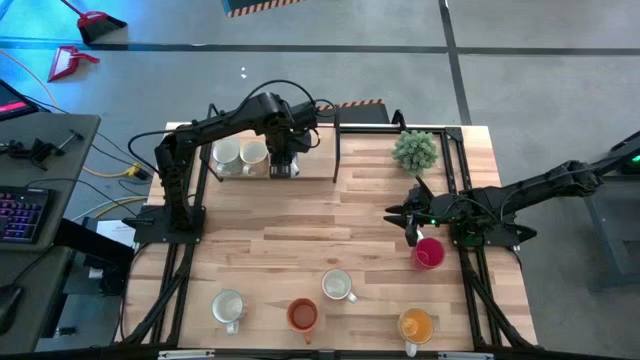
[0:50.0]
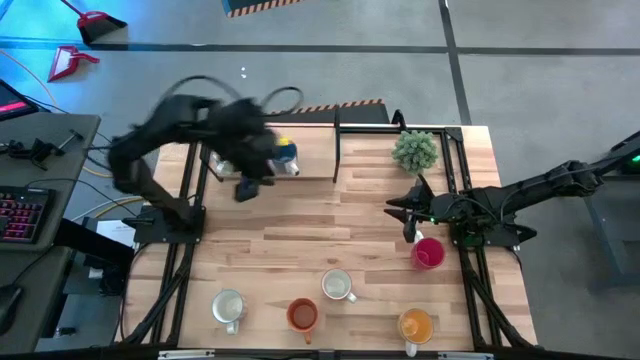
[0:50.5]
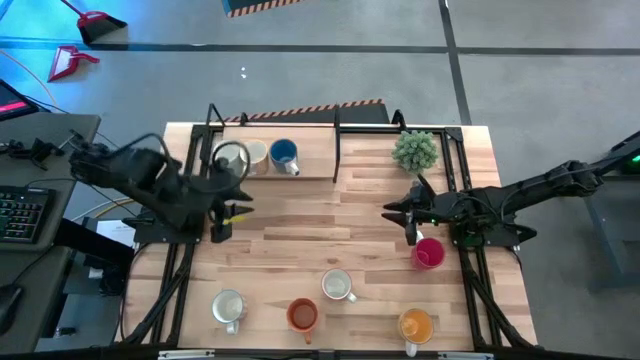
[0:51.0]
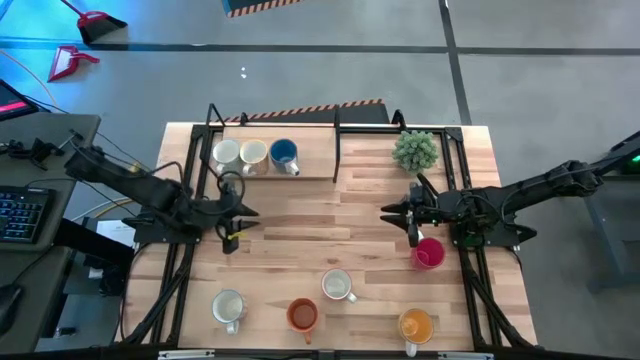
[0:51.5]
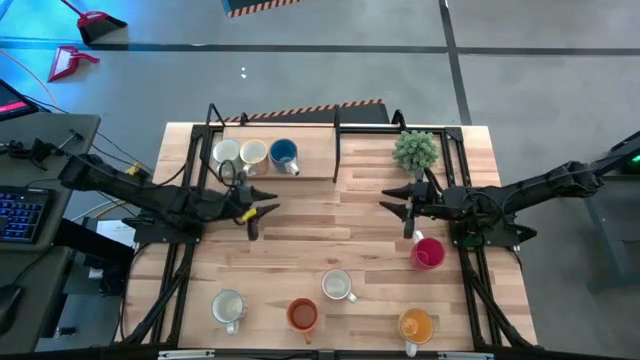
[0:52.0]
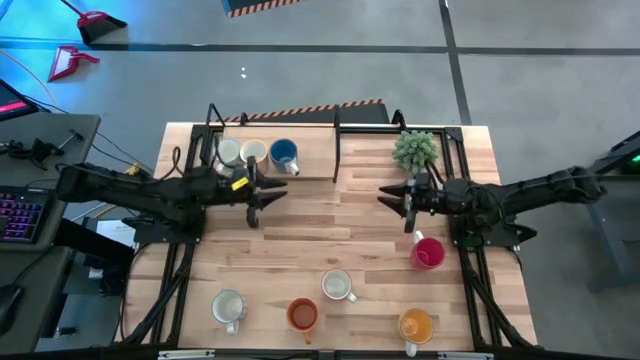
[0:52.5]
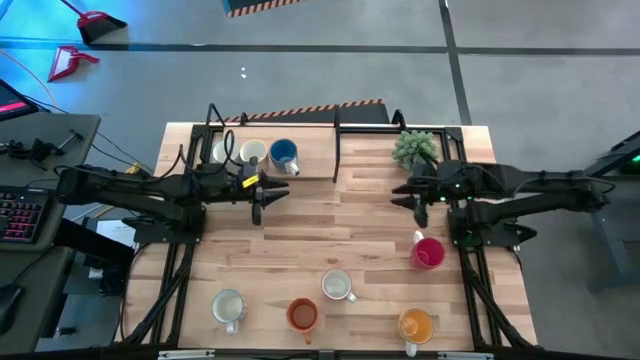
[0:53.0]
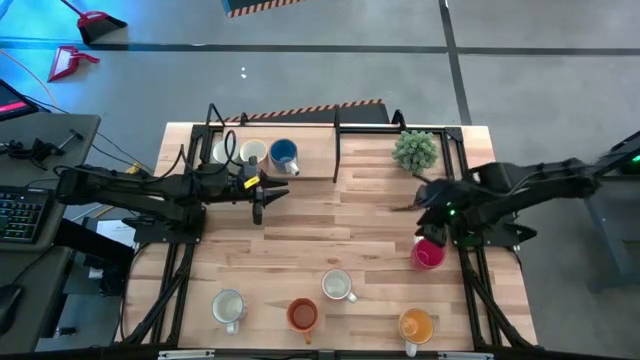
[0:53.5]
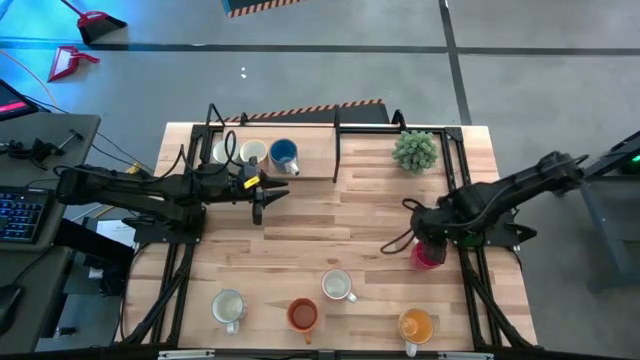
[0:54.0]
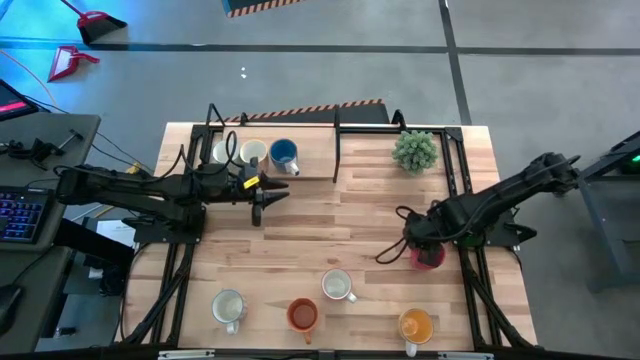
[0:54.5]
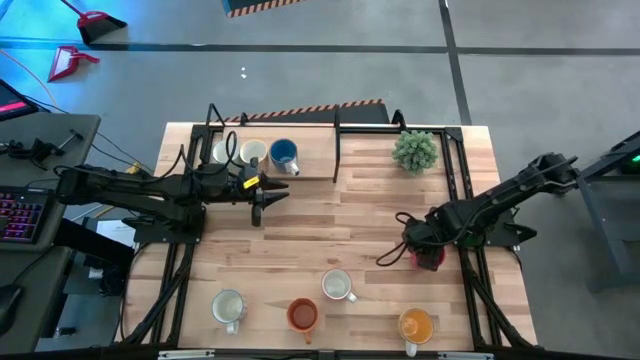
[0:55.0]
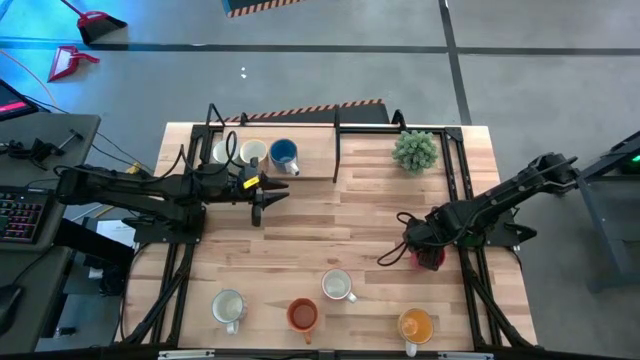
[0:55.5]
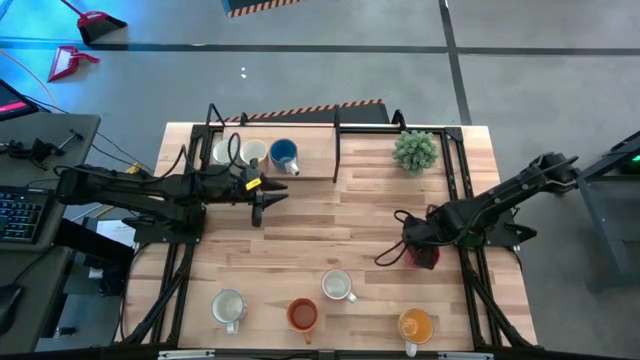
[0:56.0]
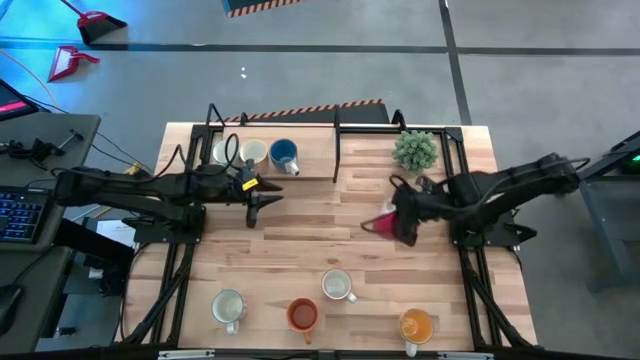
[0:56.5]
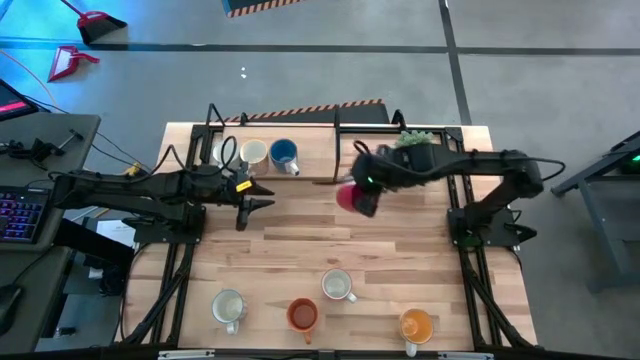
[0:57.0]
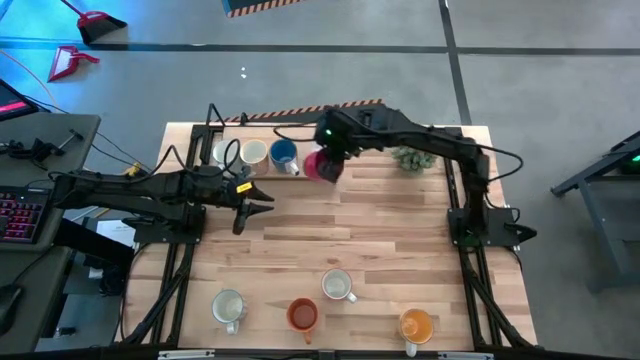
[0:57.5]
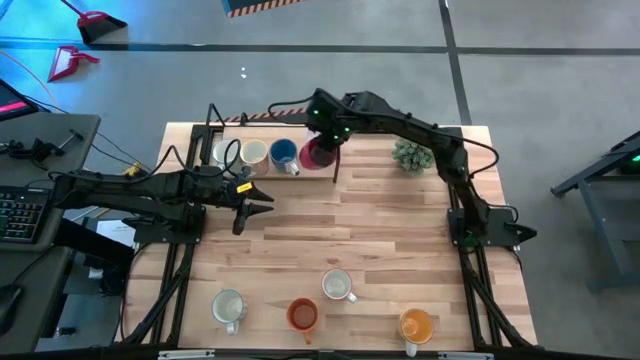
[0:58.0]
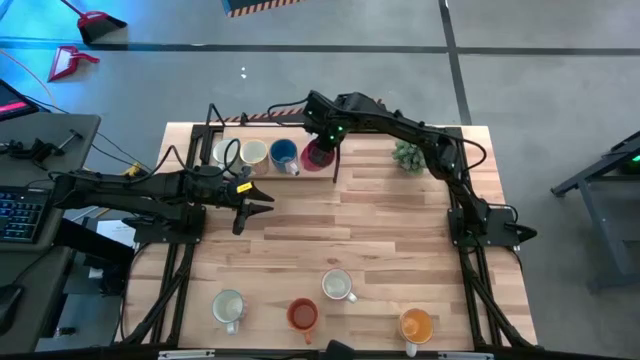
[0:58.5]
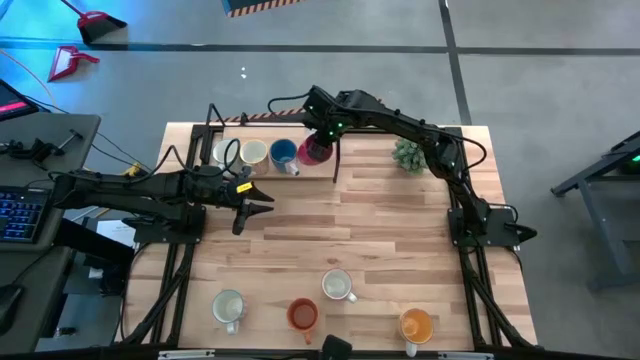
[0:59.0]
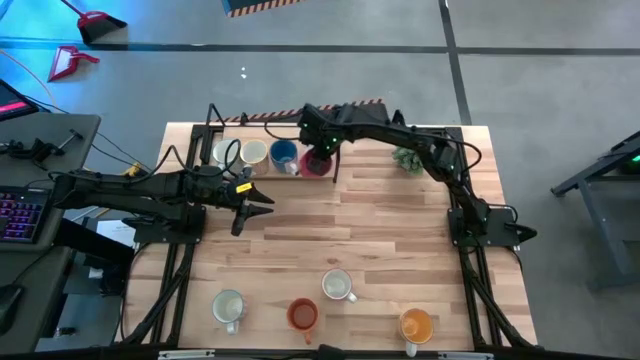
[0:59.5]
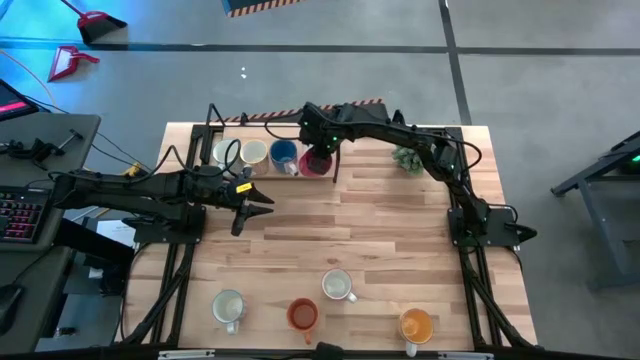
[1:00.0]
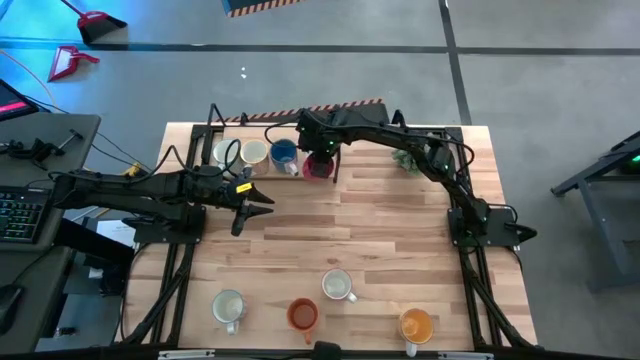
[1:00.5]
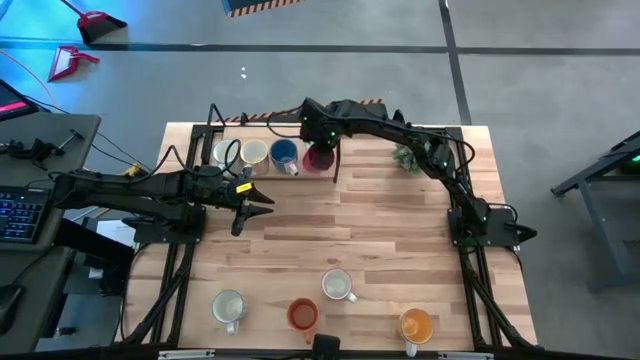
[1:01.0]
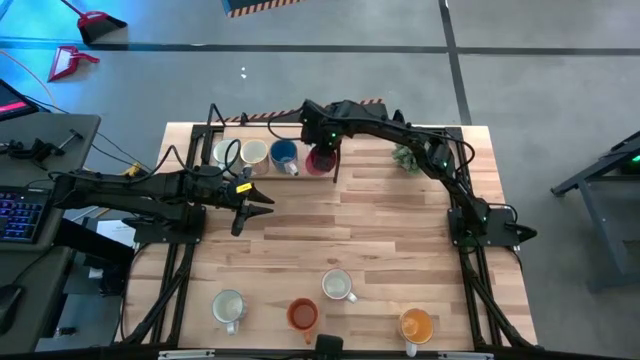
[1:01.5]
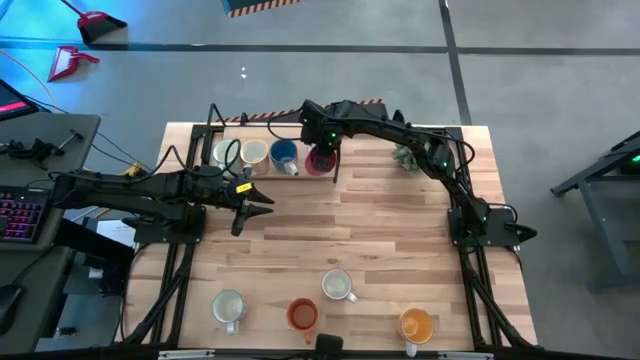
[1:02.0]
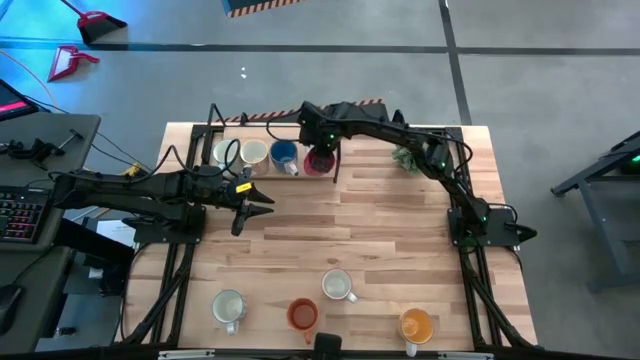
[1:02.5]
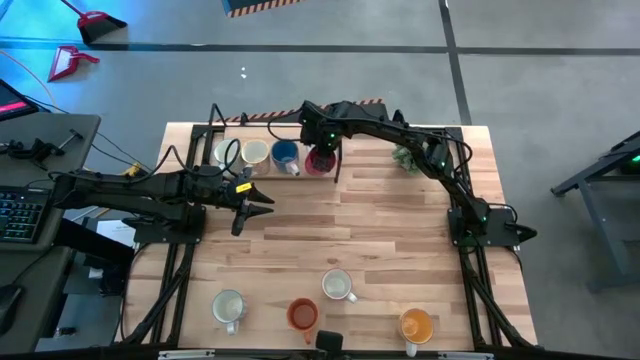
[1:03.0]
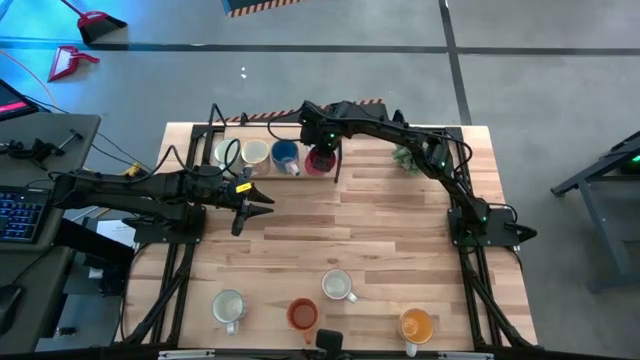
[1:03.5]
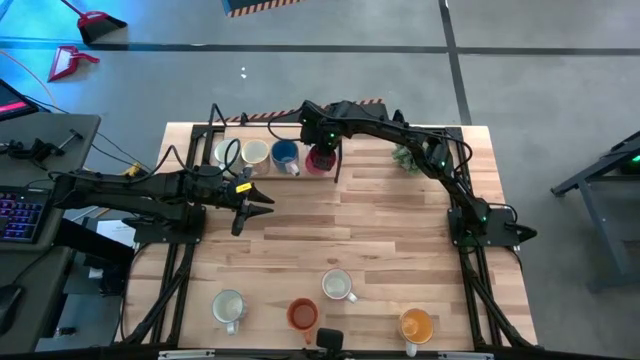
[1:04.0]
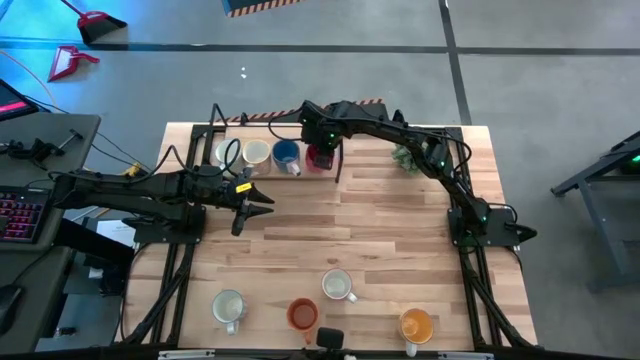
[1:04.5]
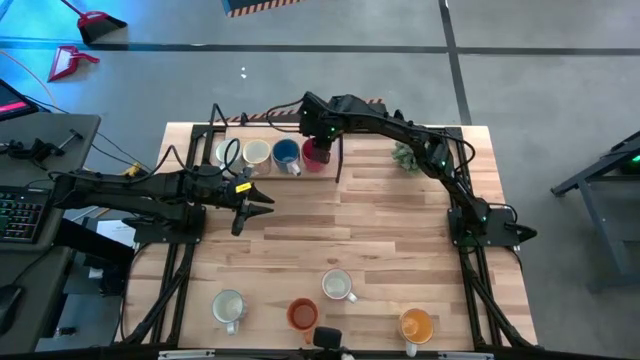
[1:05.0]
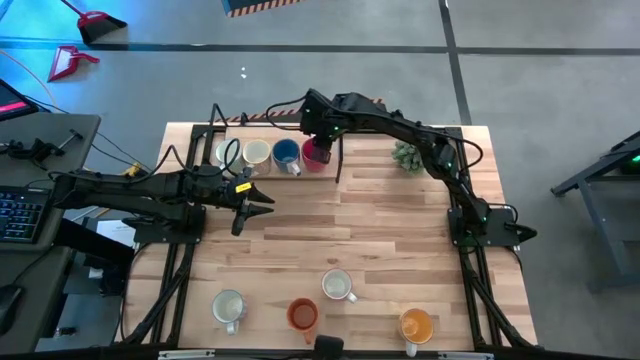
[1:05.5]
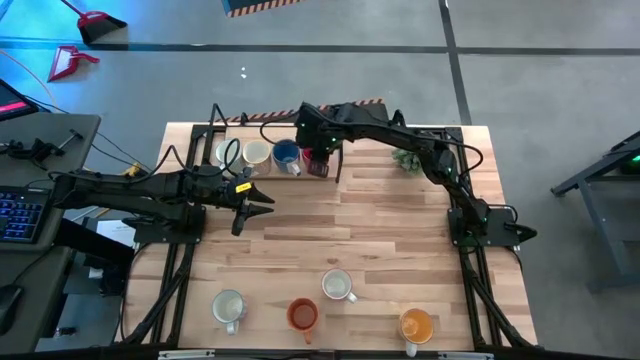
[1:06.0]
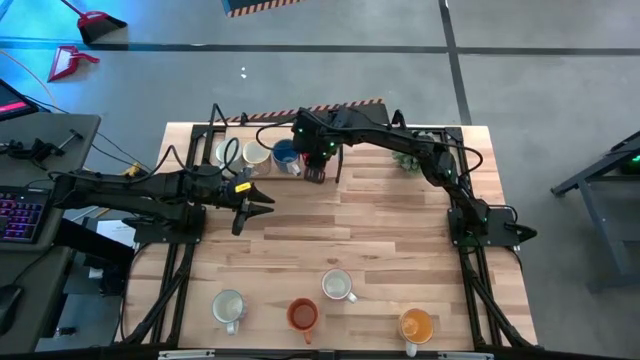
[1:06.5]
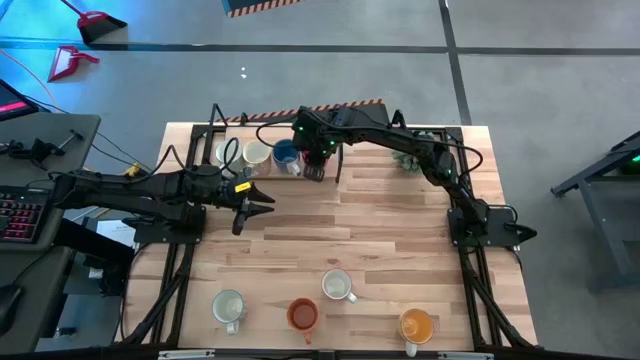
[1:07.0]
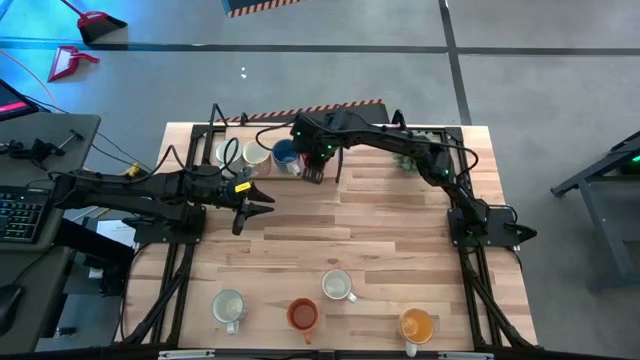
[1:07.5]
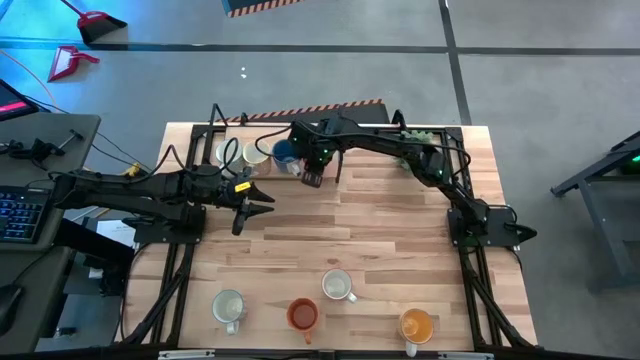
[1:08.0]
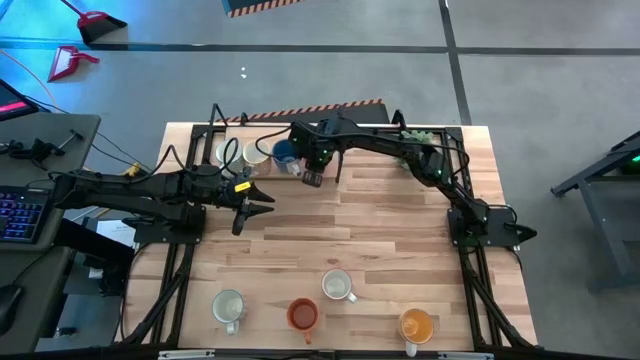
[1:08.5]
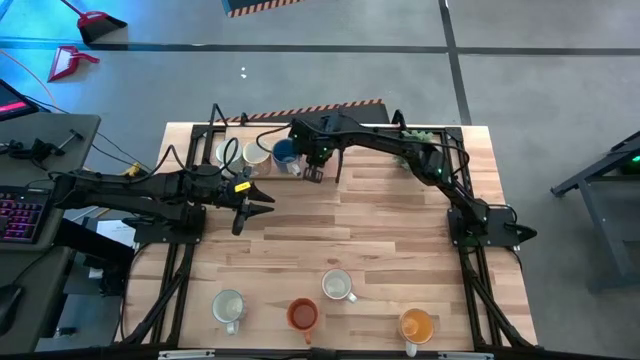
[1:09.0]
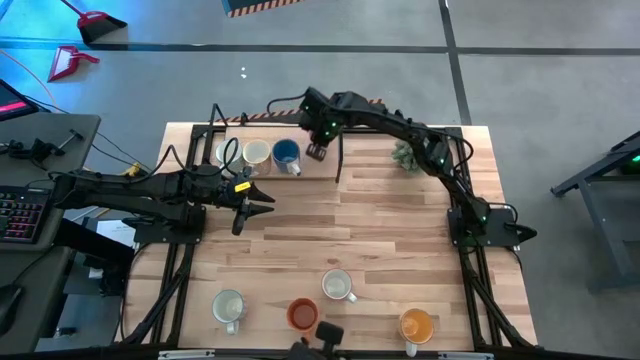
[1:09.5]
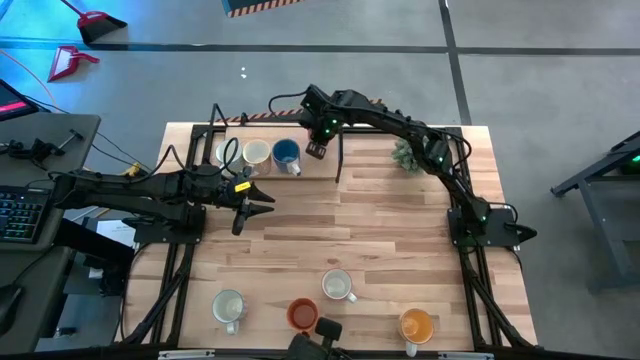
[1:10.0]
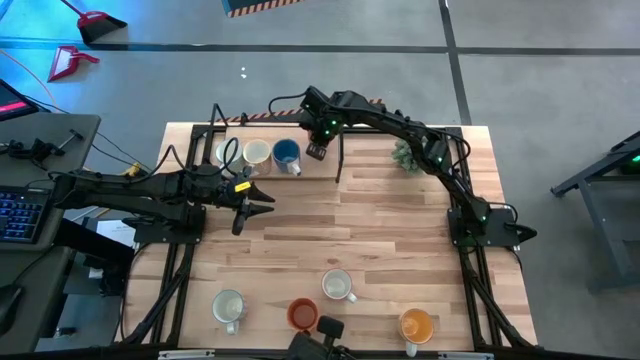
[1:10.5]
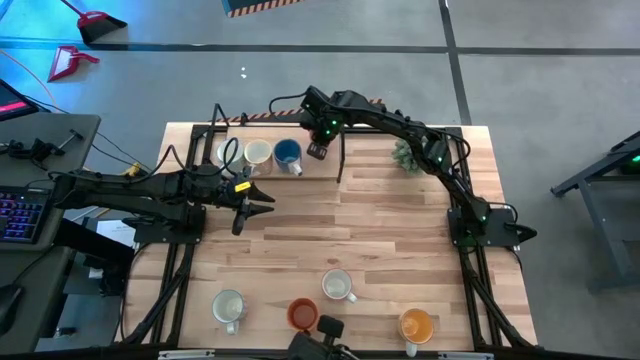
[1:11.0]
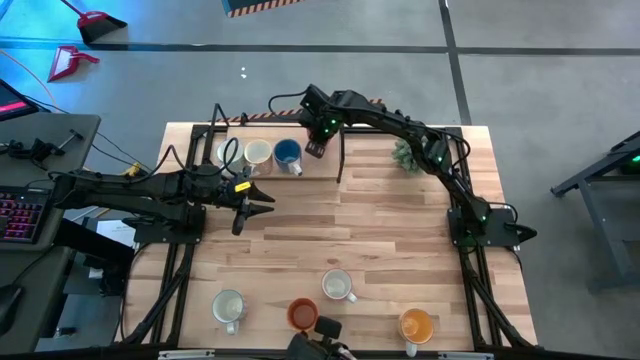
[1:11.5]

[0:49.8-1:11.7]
Task: Place coffee mugs
Put the red mug on the shelf
